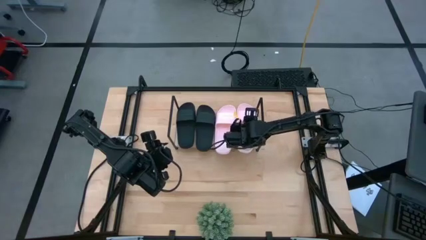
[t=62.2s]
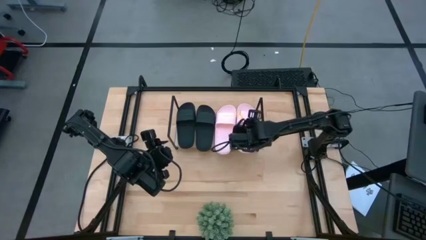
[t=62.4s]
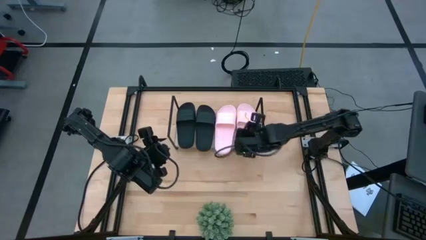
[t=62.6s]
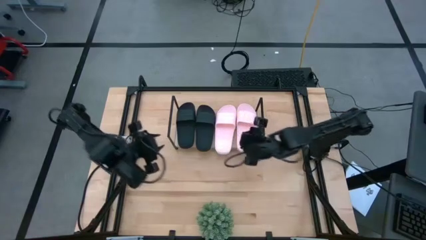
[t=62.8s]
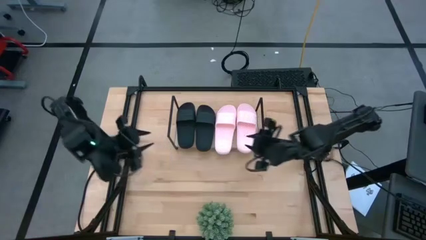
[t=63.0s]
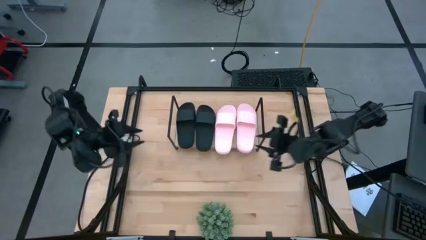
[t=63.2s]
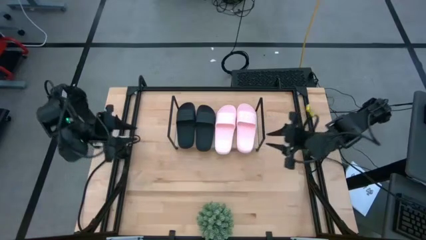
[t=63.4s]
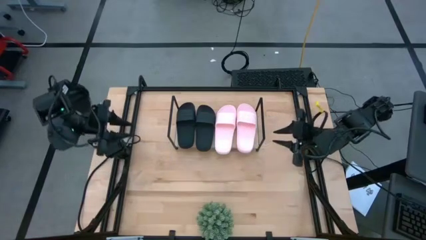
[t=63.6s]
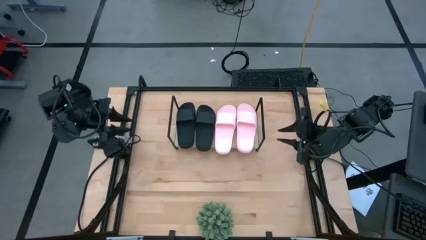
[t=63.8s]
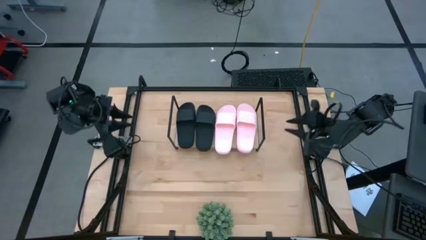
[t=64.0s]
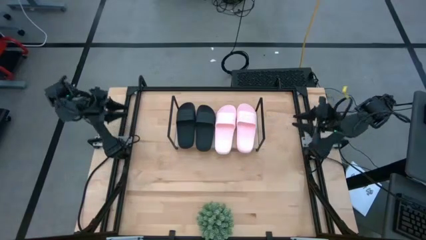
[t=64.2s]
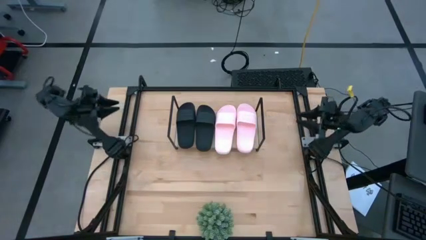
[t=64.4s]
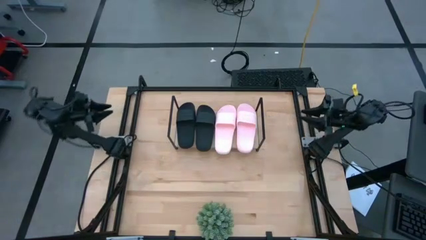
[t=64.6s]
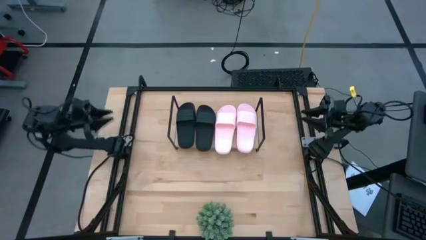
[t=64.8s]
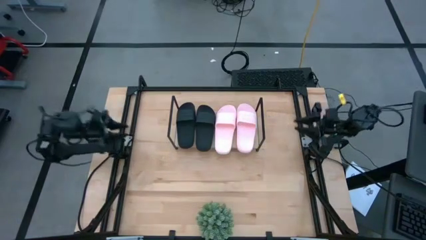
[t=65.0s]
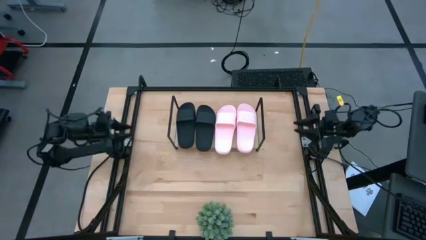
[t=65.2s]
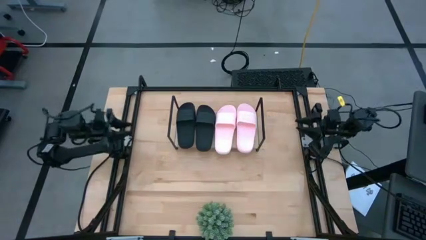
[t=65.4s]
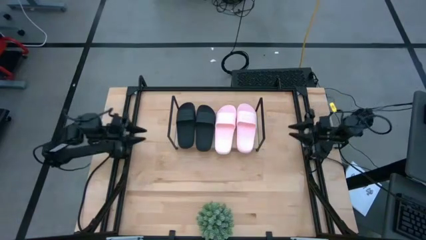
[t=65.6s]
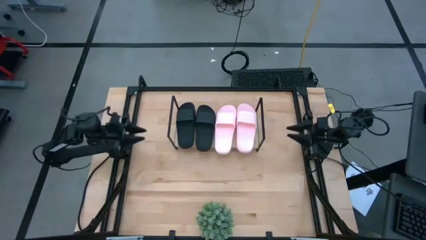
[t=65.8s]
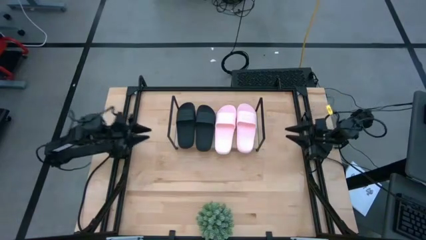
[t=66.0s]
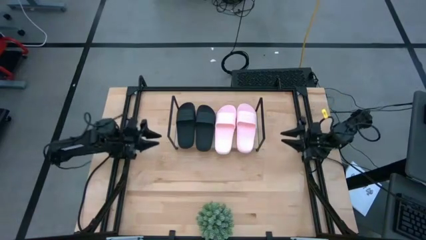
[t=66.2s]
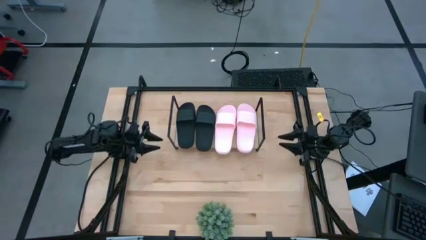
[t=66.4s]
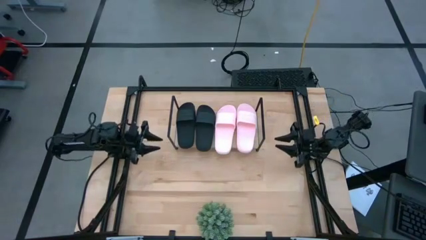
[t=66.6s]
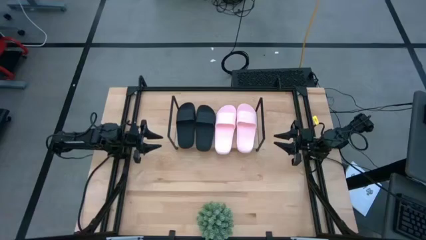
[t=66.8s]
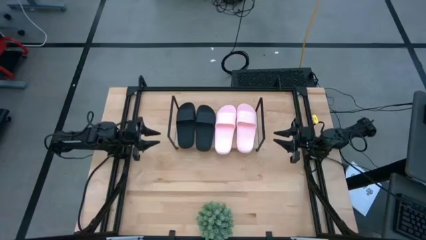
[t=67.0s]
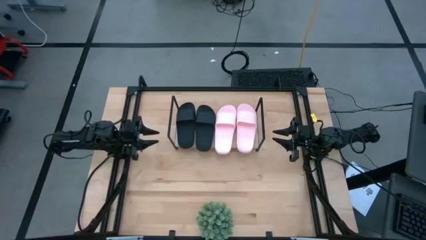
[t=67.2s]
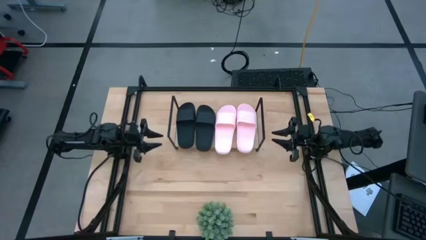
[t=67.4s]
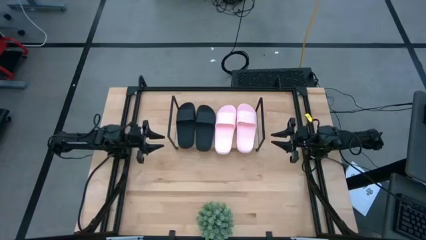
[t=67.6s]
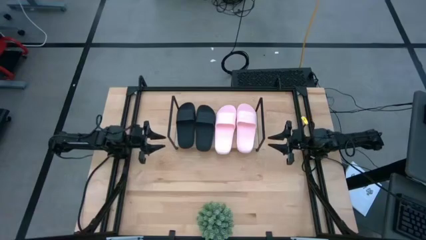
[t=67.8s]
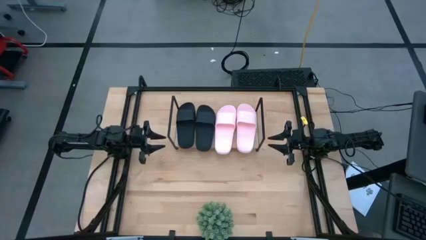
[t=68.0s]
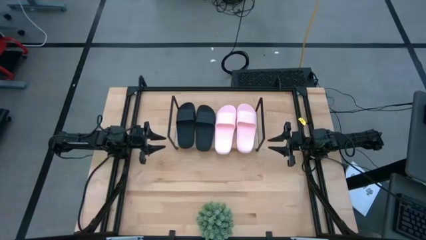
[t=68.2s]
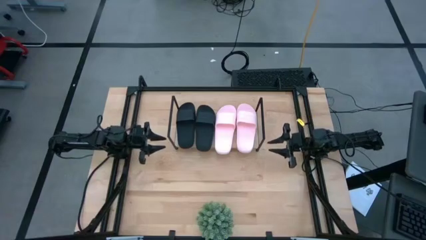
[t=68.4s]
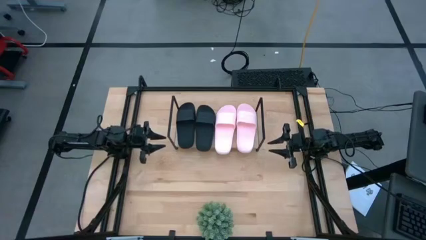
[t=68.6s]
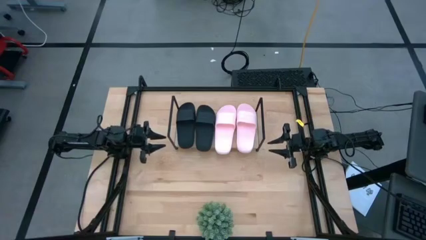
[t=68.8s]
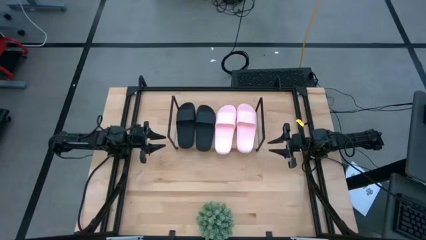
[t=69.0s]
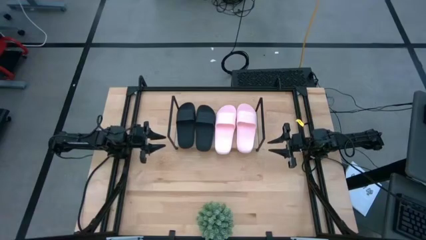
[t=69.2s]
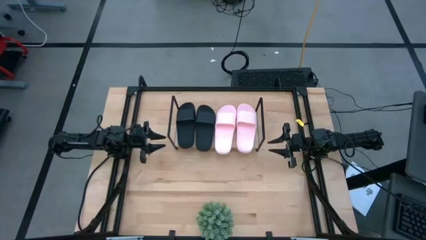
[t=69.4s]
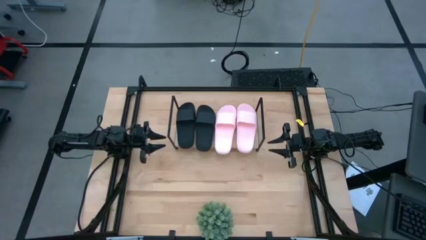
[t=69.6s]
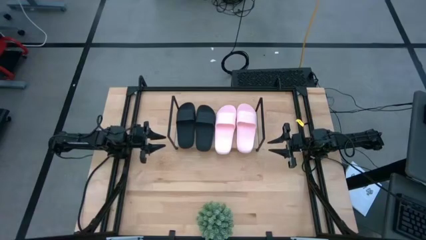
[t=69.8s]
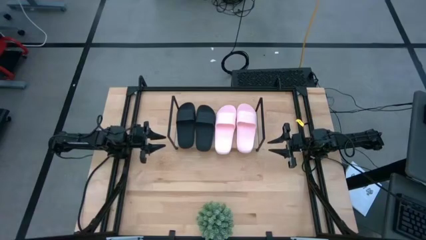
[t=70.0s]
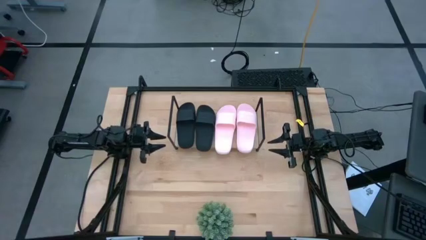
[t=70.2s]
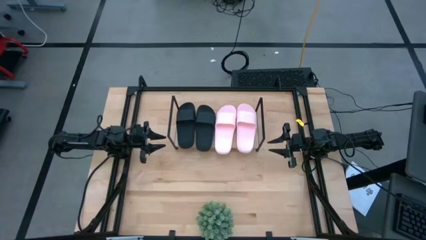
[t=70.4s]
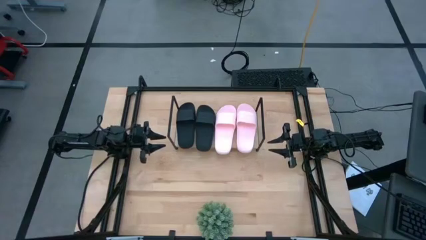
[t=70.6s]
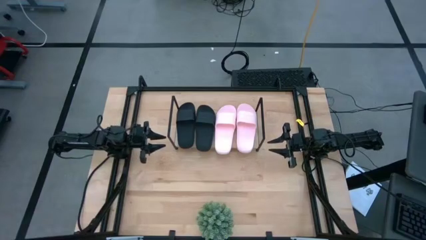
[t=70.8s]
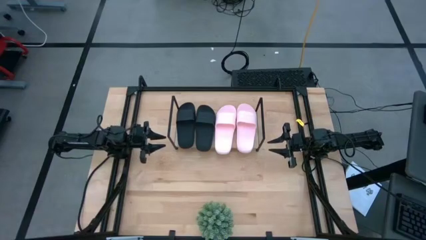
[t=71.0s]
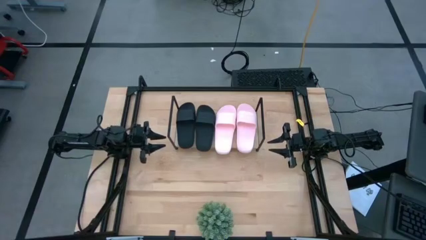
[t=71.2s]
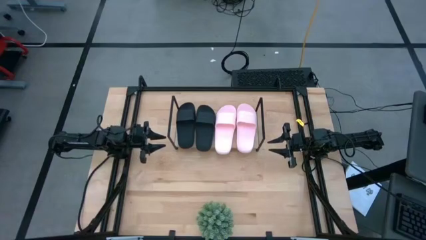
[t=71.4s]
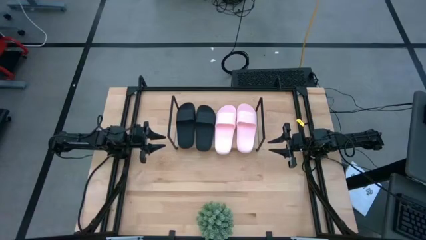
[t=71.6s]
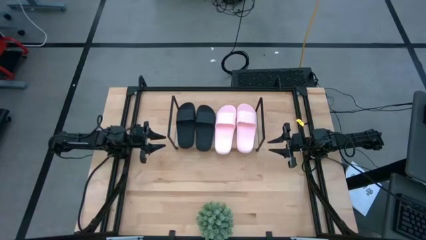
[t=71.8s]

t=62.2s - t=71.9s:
Task: Pick and place slides into the shelf
Return to Home Position

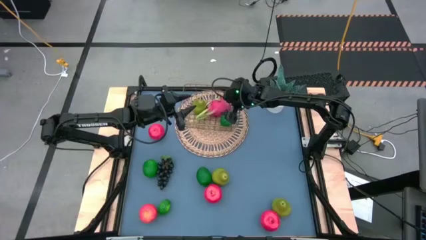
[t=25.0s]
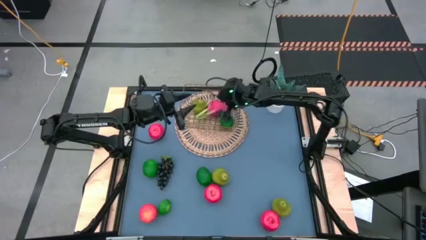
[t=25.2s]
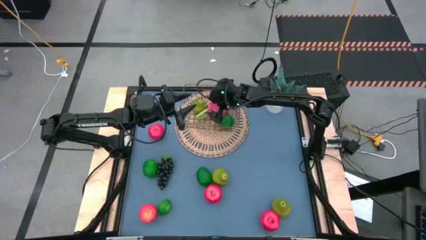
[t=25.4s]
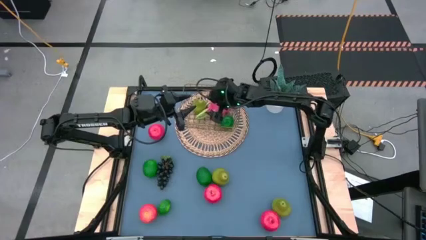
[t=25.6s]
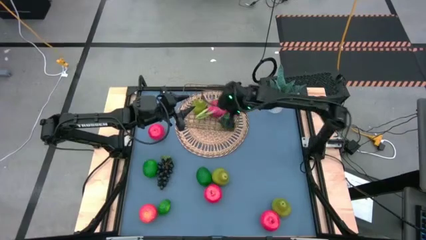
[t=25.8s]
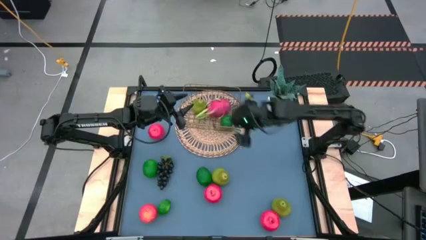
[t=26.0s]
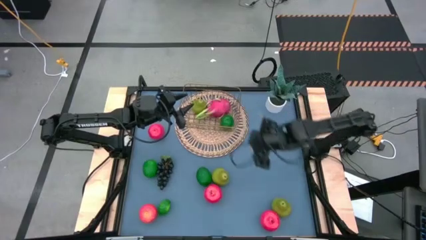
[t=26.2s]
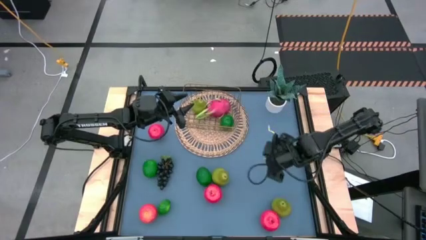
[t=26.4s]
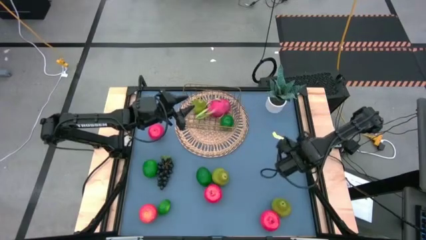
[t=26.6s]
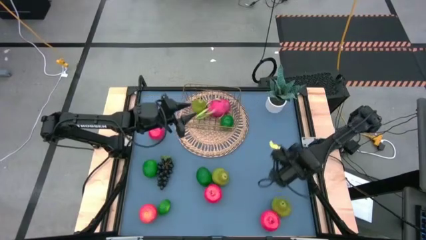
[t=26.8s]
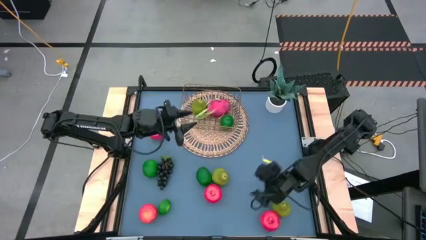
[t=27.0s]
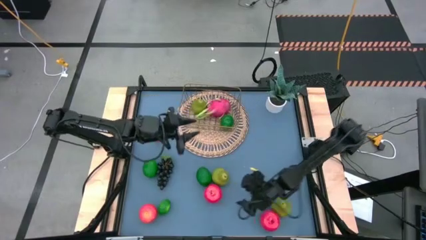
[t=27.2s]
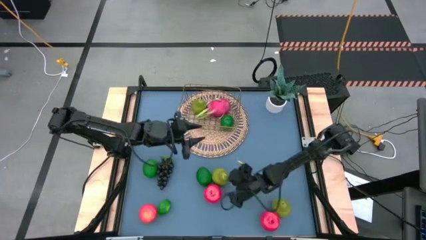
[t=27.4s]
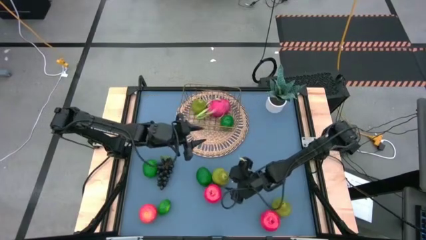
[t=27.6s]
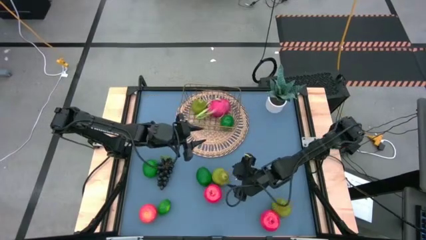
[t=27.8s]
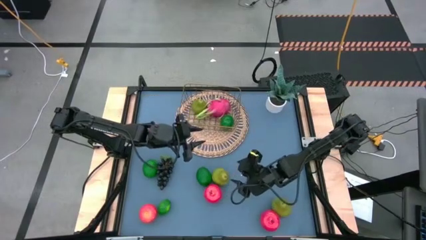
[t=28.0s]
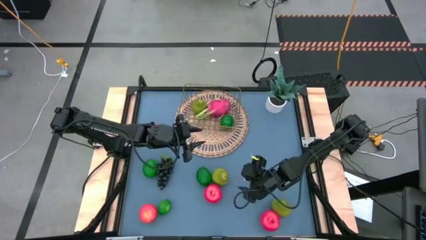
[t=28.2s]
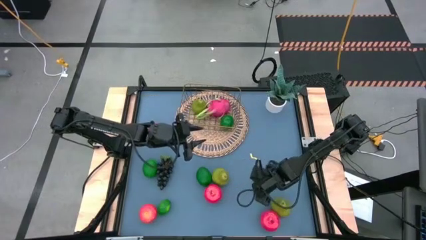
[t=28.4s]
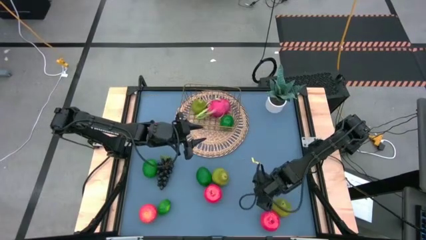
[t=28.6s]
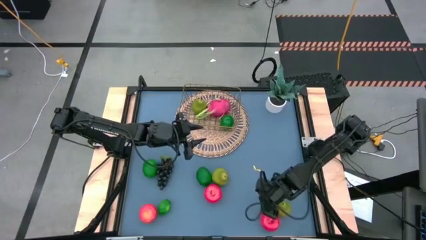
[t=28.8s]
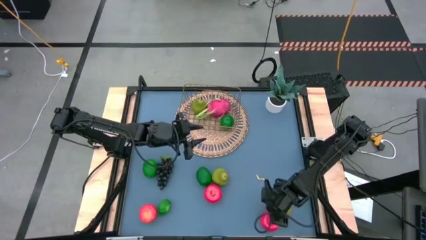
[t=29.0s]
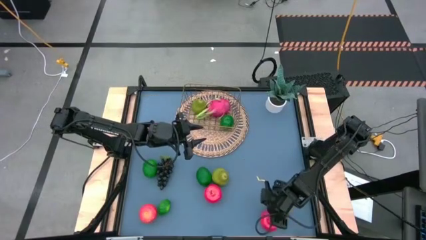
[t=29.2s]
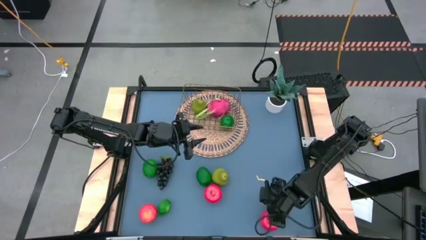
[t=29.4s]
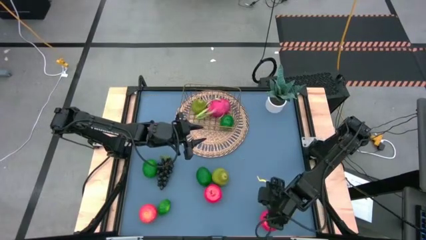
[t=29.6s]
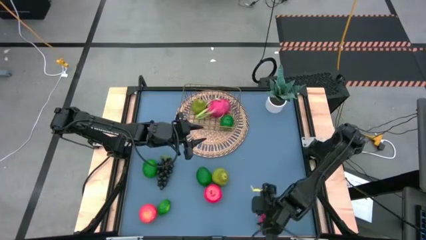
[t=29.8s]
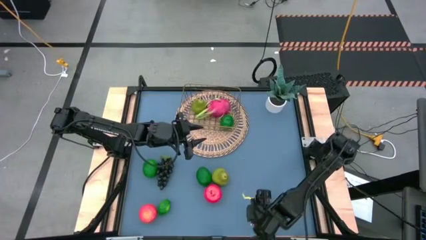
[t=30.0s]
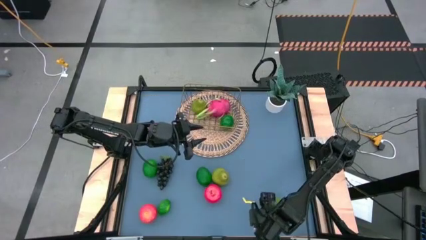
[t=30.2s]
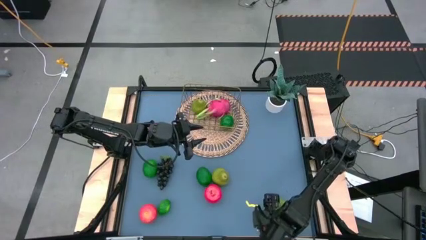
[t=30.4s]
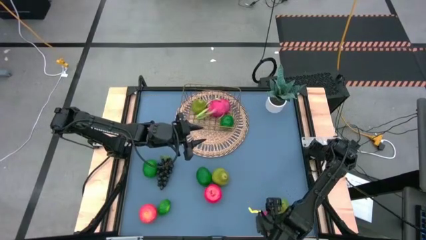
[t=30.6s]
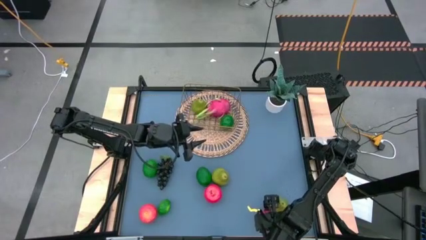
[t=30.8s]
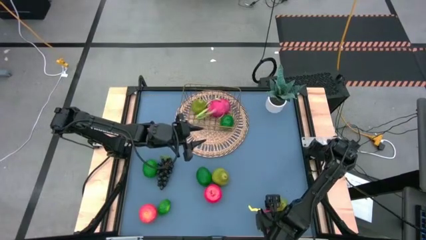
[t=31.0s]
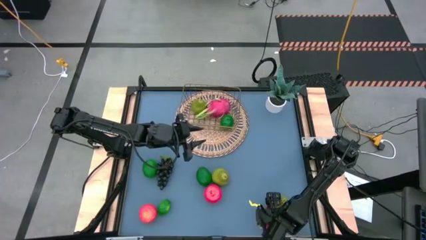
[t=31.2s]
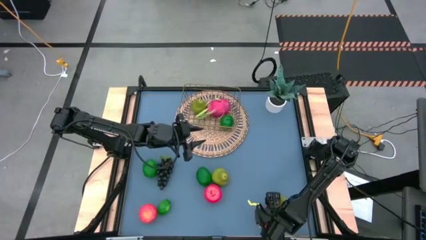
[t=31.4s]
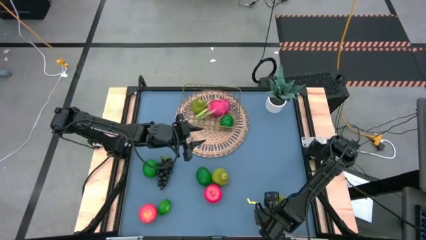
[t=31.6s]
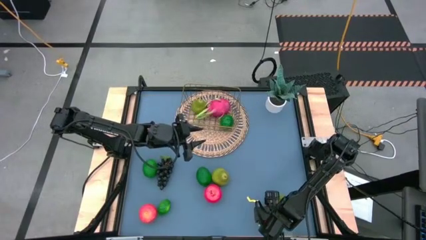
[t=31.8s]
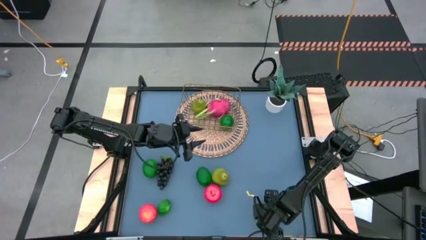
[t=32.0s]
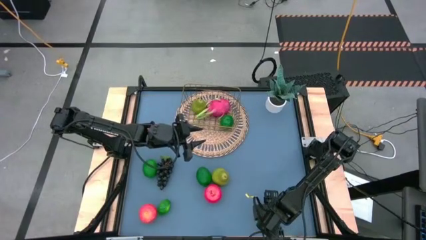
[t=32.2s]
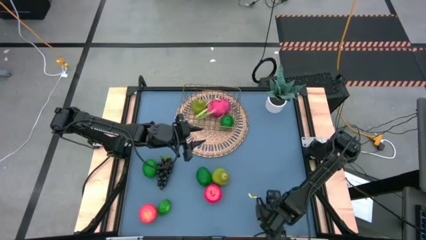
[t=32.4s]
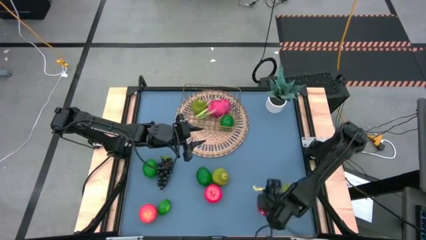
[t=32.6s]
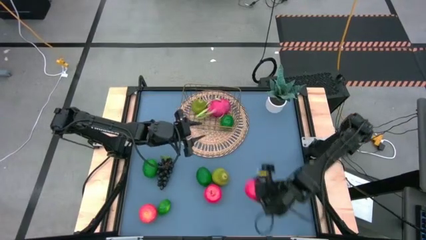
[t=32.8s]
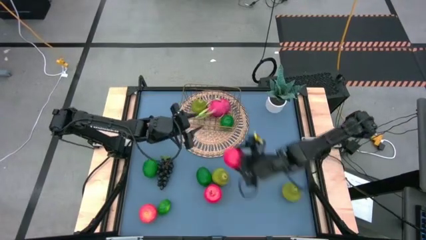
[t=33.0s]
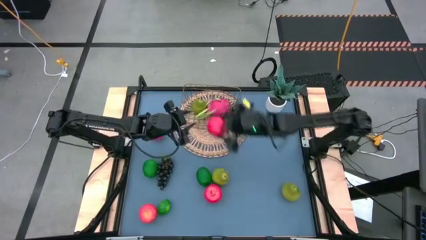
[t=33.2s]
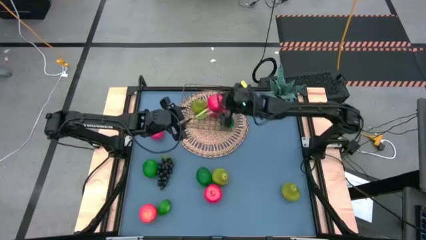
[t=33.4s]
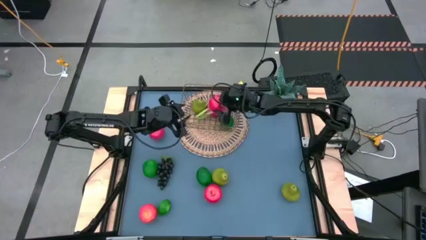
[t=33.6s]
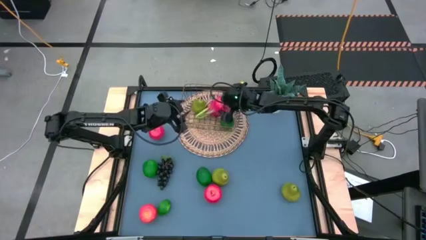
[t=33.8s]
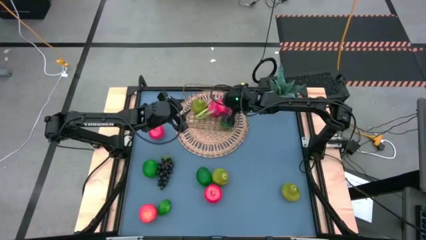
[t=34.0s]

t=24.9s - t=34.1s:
Task: Build produce basket
Put the red apple into the gold wire basket
